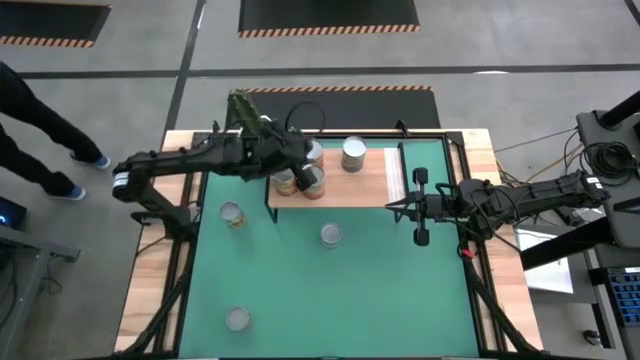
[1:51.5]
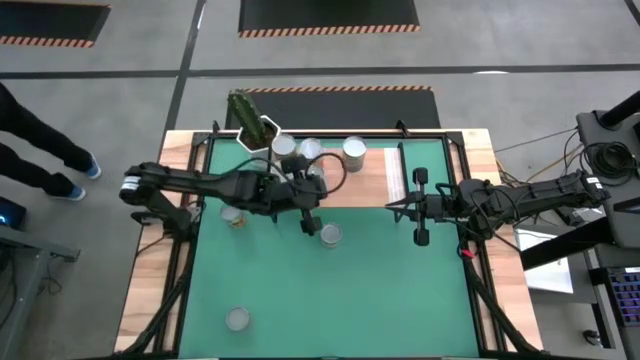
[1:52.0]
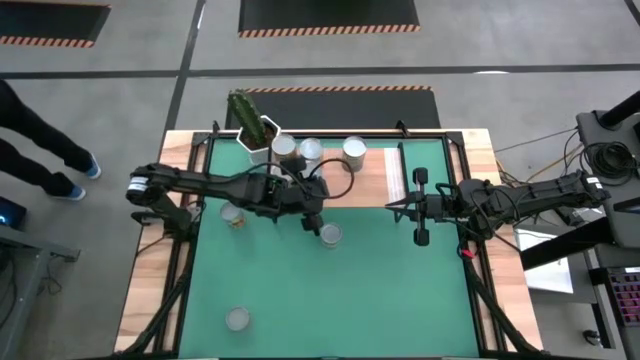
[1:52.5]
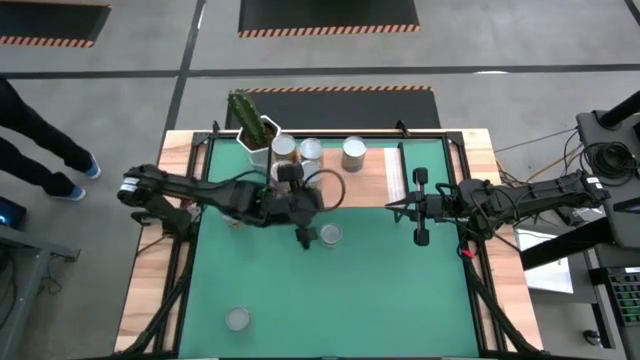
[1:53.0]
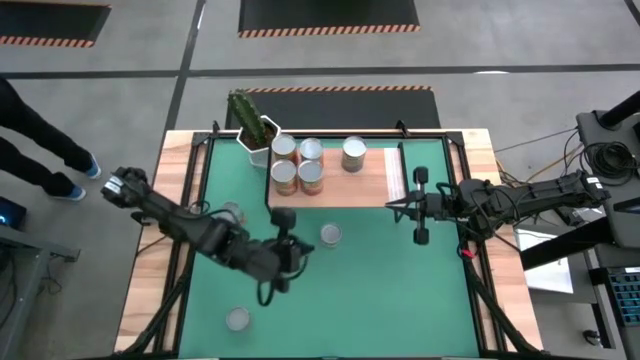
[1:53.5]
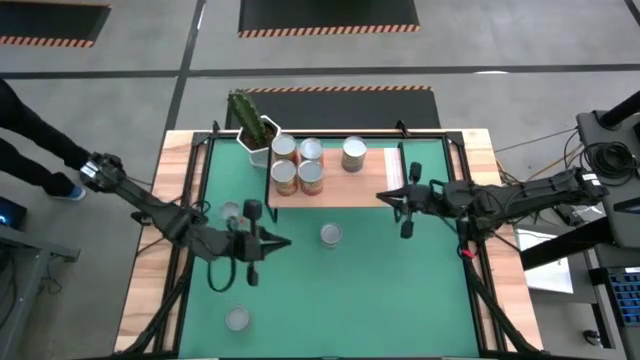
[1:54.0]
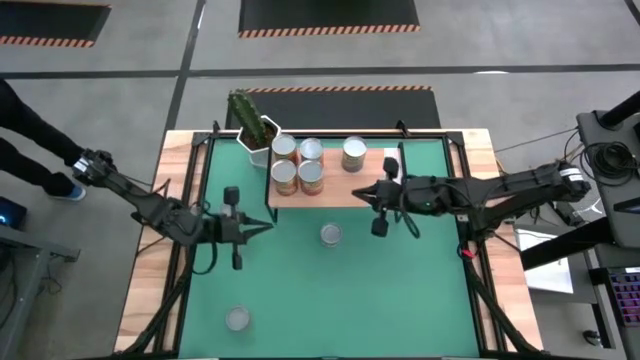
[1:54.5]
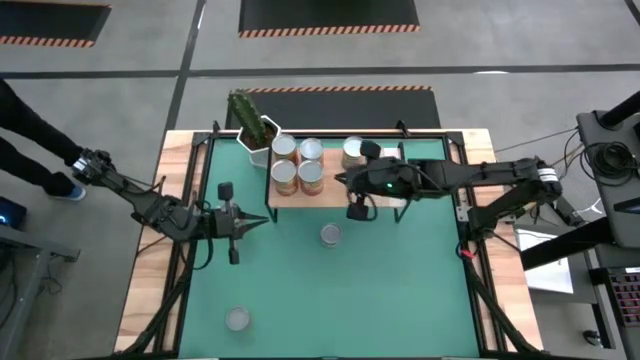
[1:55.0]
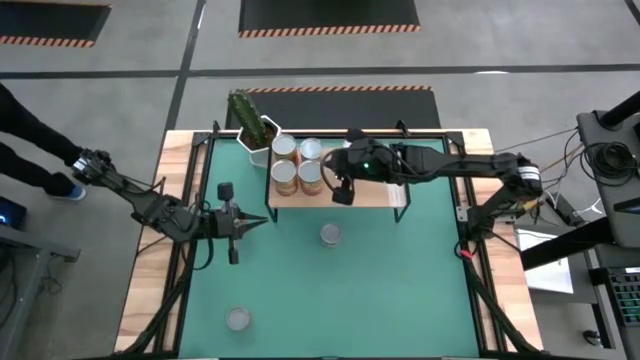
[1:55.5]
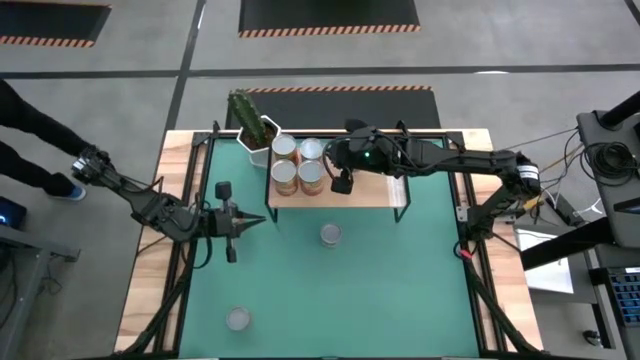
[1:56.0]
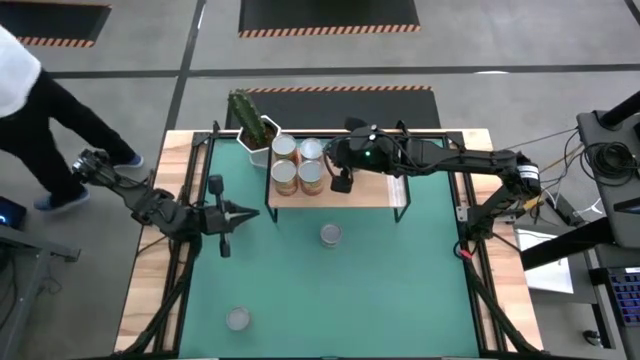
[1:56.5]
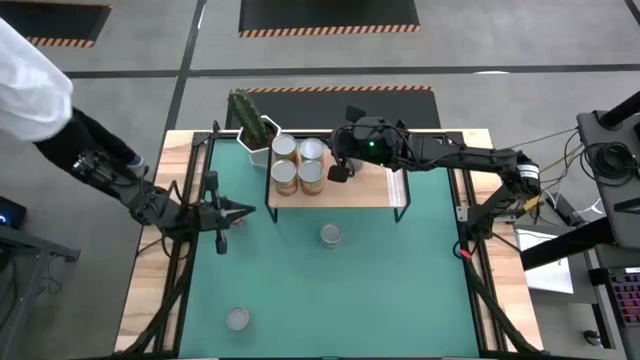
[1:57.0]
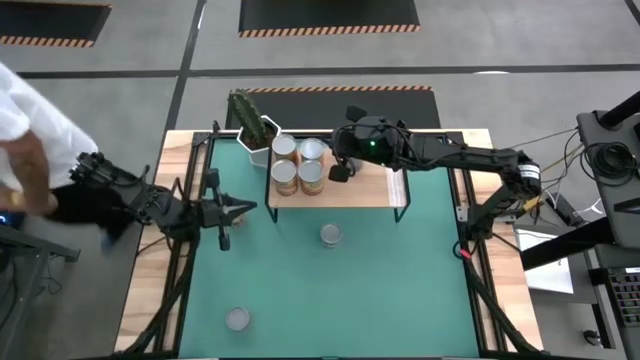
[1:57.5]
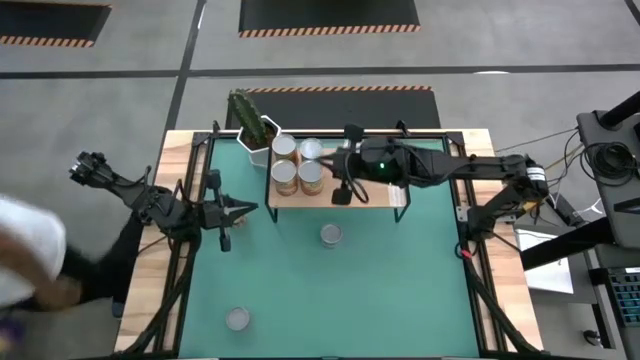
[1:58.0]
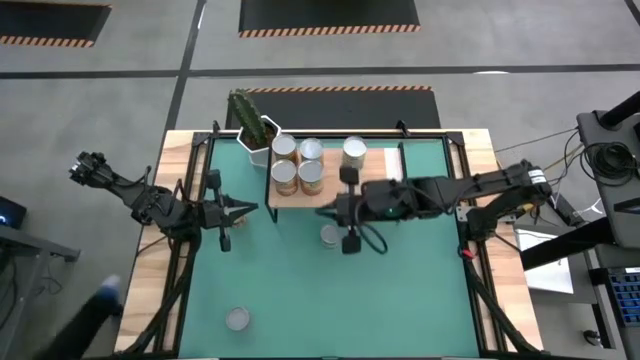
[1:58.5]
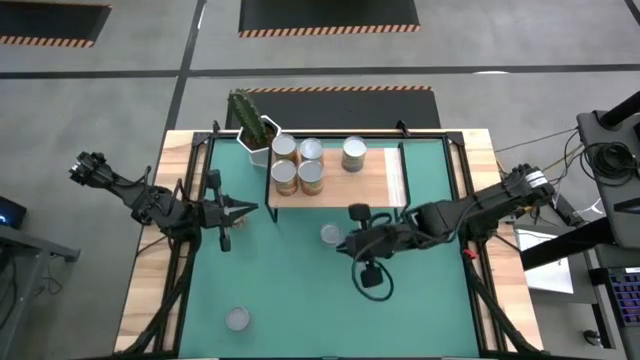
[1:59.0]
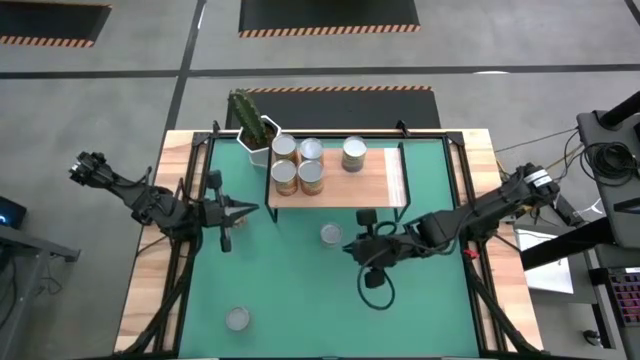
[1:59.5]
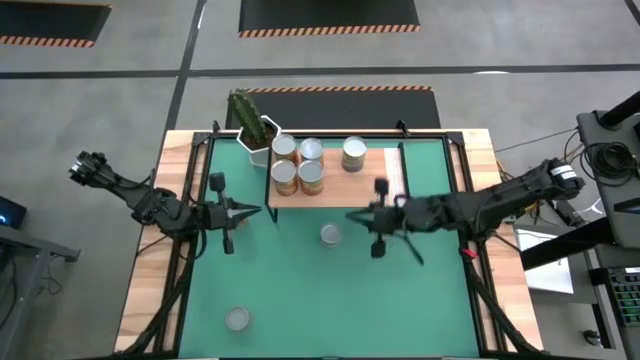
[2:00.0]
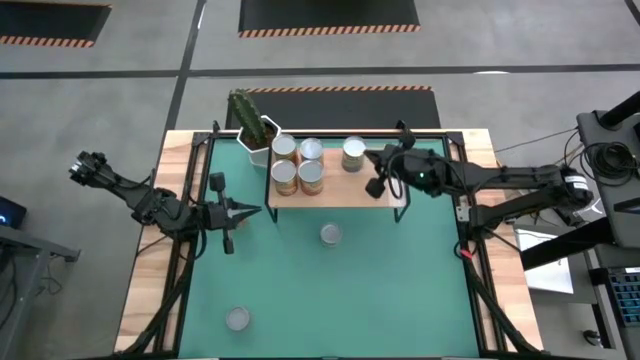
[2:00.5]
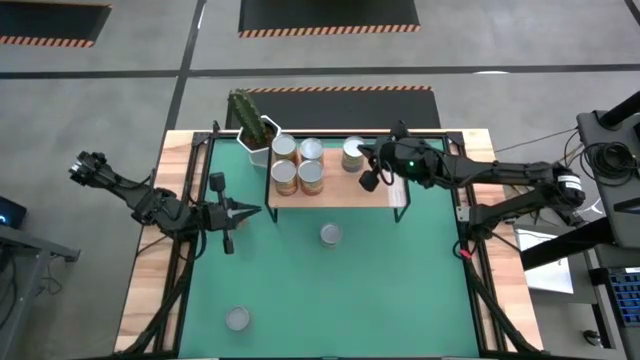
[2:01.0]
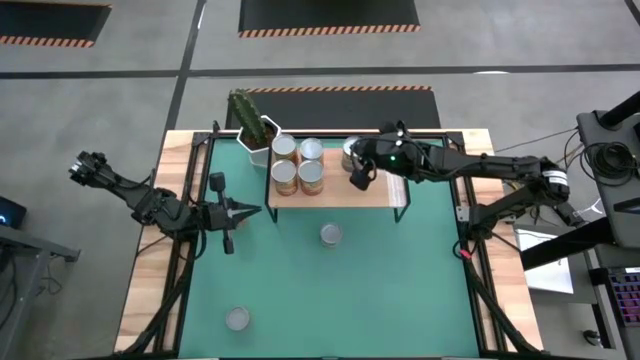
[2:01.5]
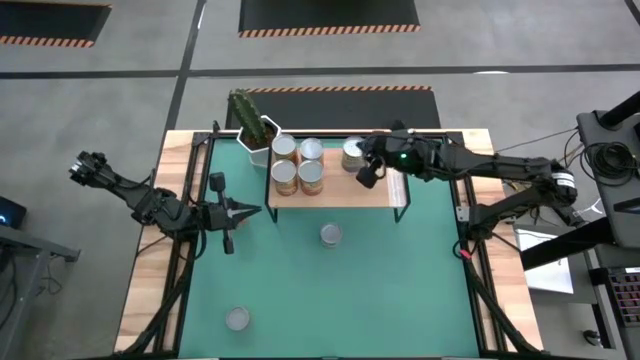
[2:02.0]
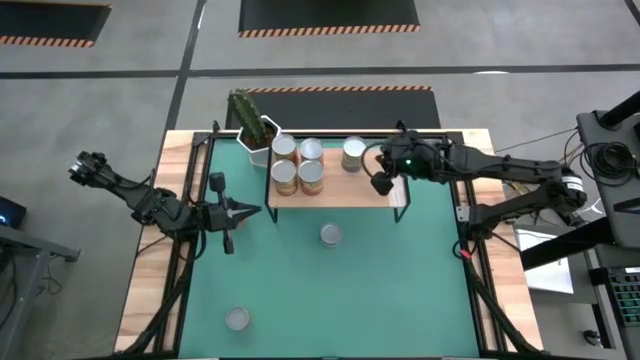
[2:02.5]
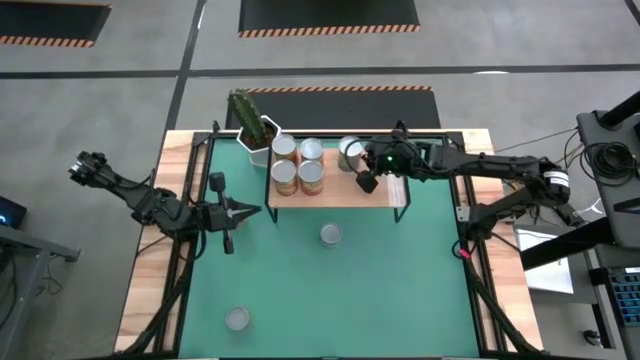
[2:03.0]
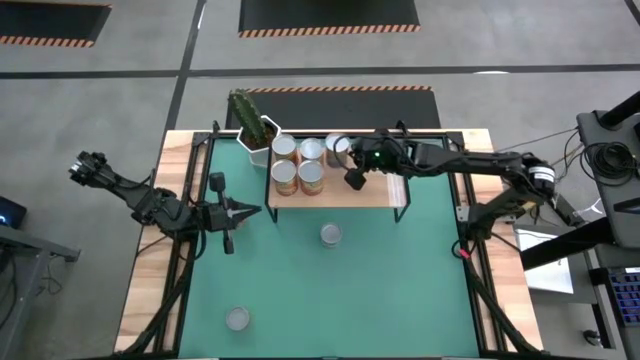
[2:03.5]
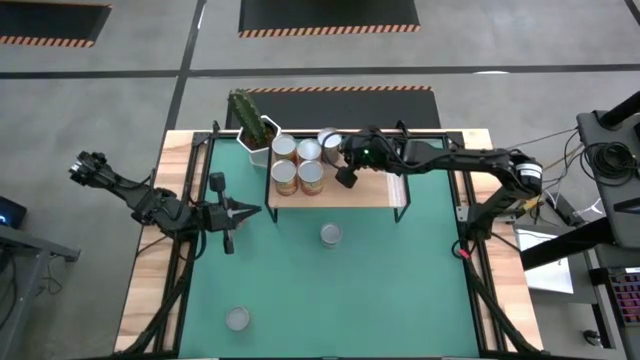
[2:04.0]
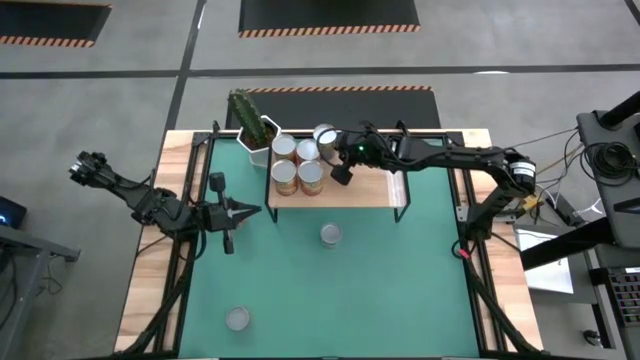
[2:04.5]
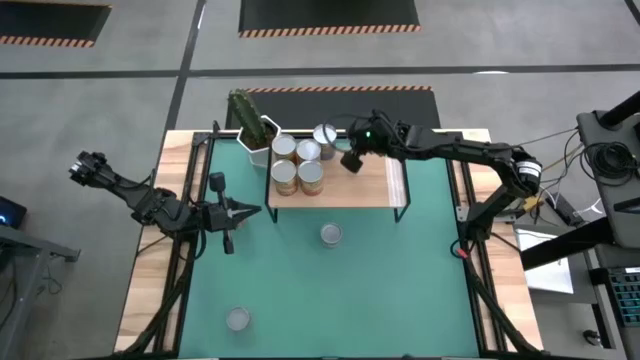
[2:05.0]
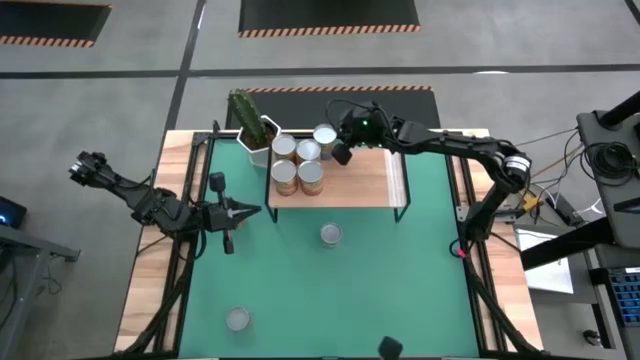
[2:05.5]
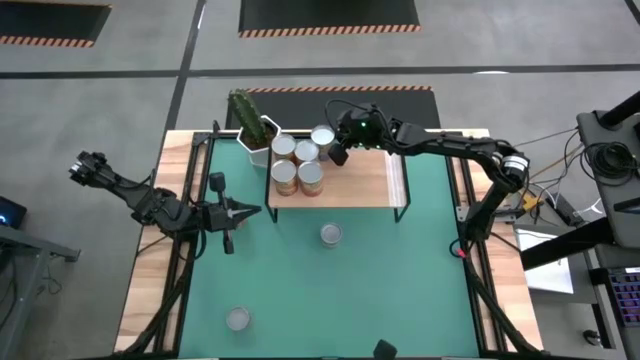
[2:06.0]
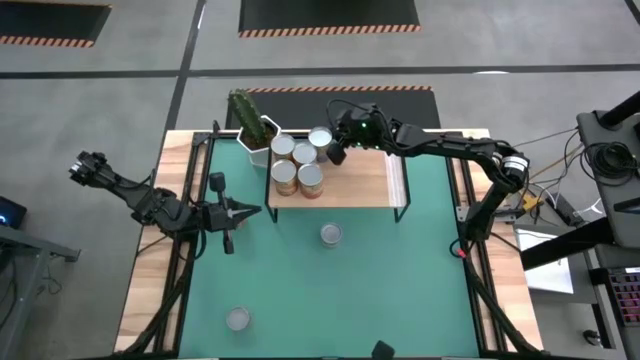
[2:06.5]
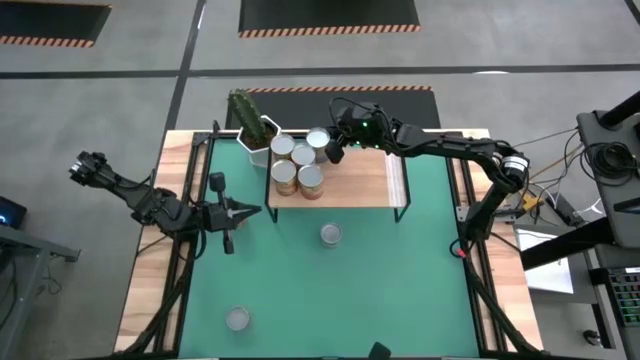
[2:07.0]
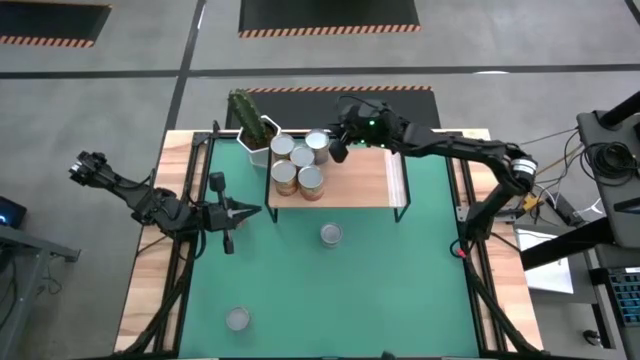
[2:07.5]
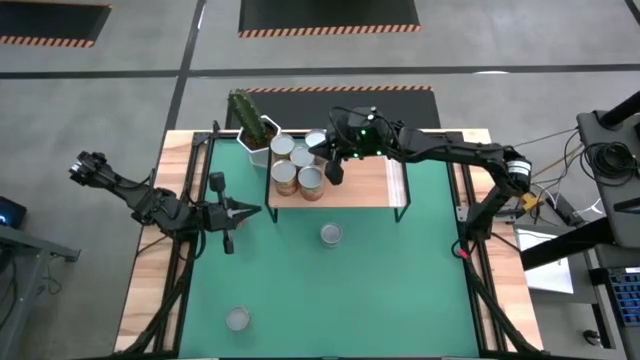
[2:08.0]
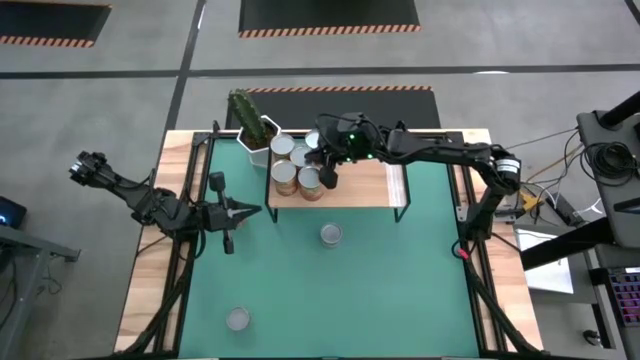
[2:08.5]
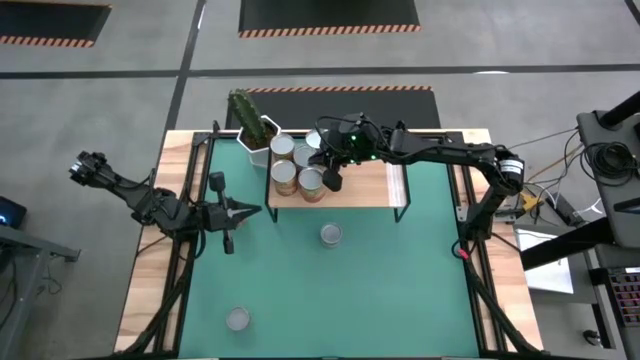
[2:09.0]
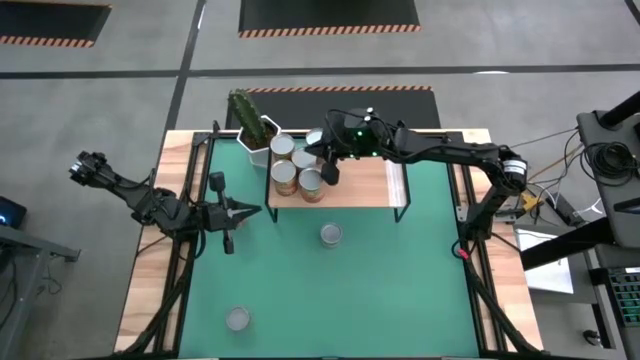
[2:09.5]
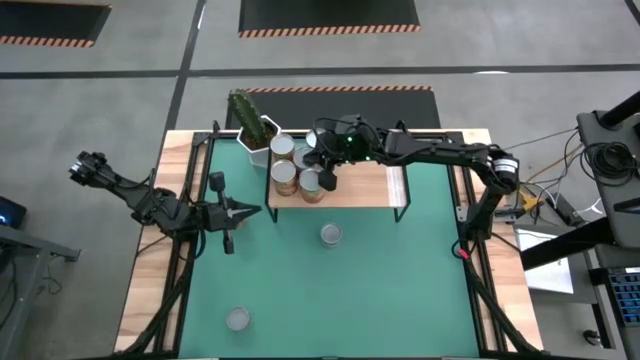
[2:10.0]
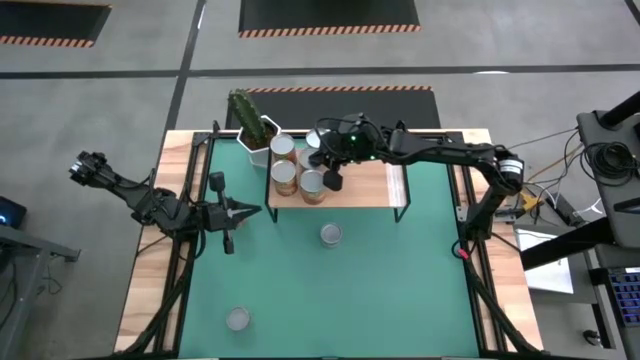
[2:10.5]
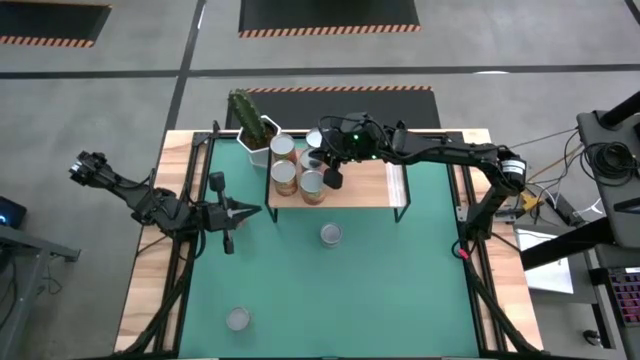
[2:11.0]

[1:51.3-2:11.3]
Task: Pick and place cans onto a shelf
Adjust the cans on the shelf

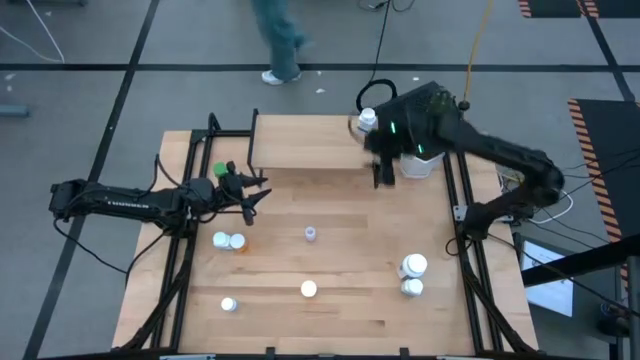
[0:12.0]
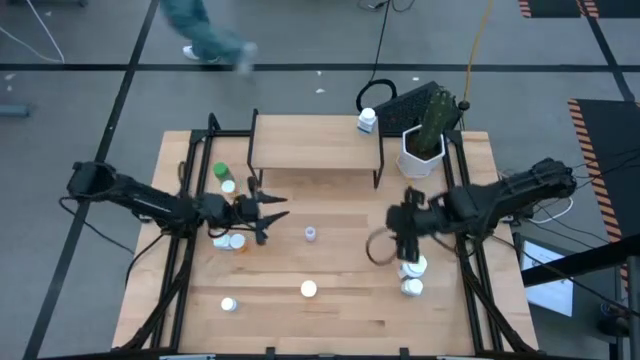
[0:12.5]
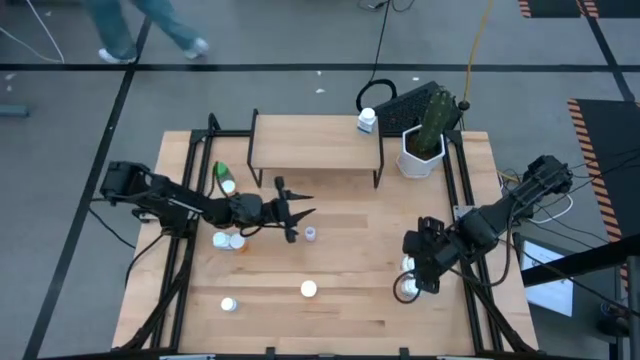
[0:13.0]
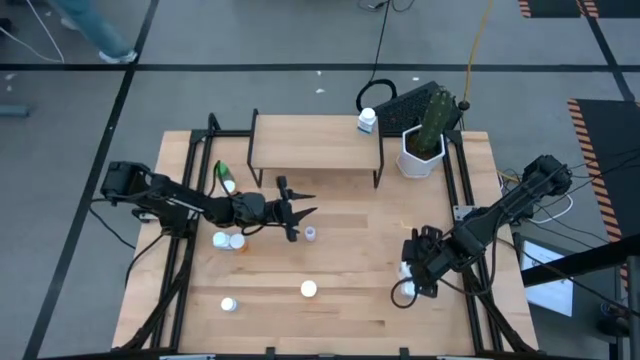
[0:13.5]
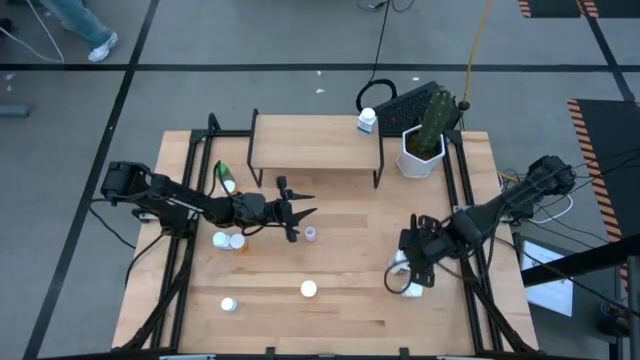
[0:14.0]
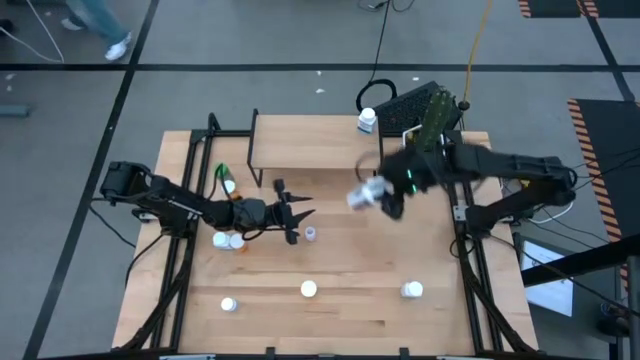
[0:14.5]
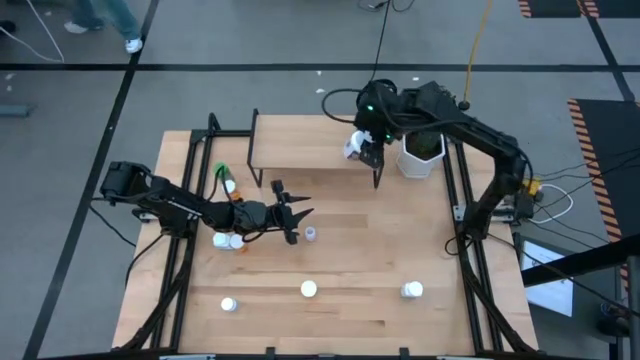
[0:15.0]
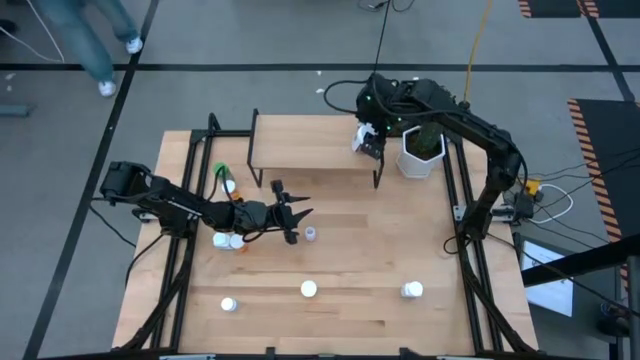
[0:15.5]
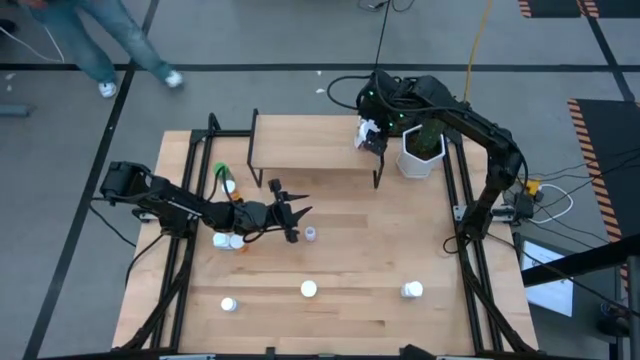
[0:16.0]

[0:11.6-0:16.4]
Task: Pick and place medicine bottles onto shelf by color
Put the white and purple medicine bottle on the shelf
